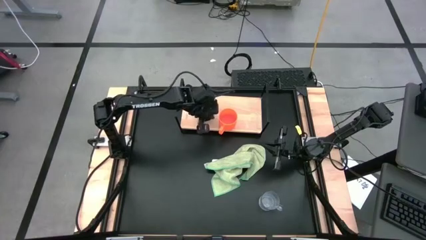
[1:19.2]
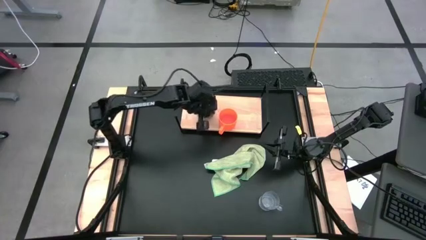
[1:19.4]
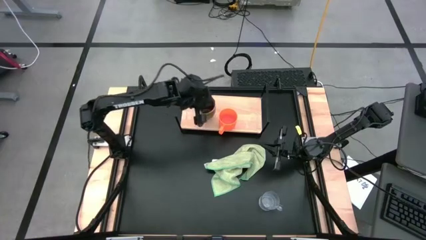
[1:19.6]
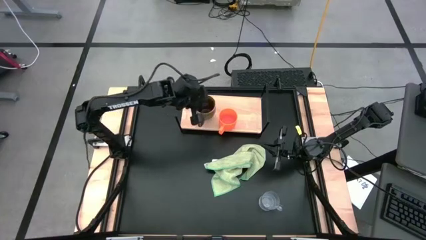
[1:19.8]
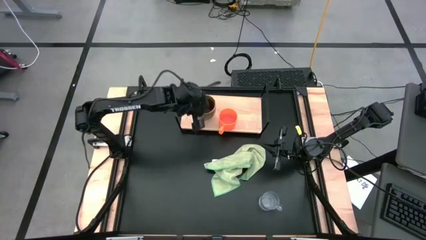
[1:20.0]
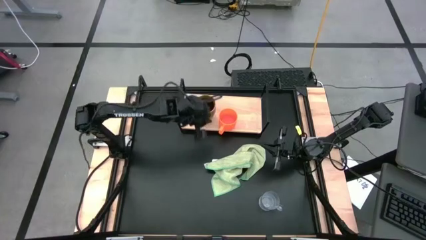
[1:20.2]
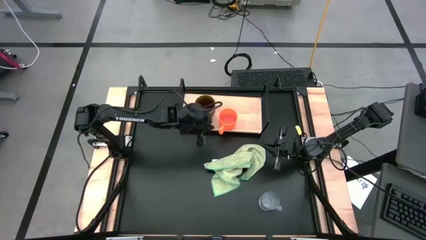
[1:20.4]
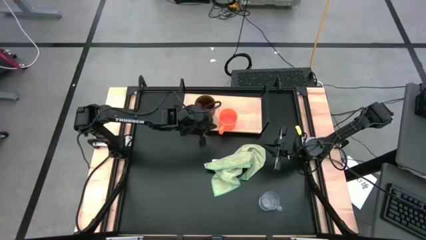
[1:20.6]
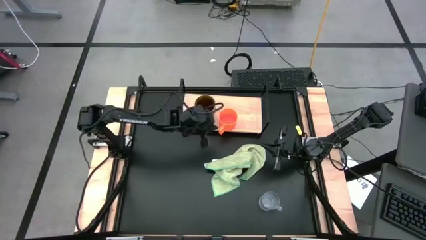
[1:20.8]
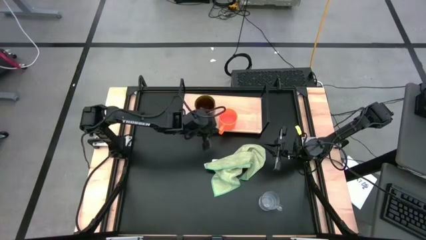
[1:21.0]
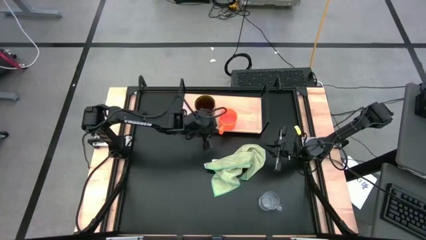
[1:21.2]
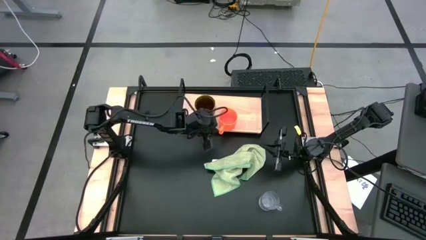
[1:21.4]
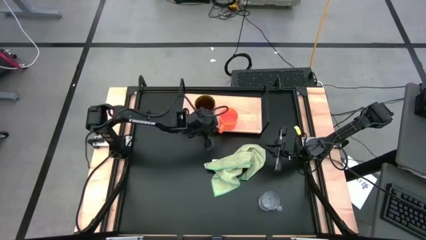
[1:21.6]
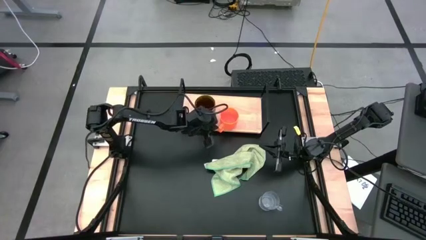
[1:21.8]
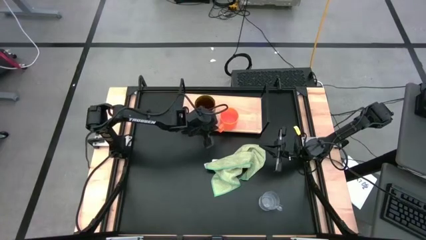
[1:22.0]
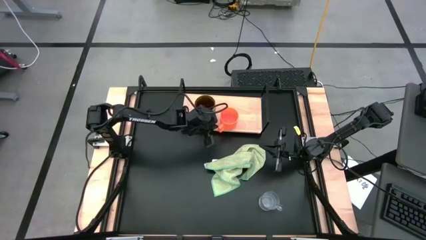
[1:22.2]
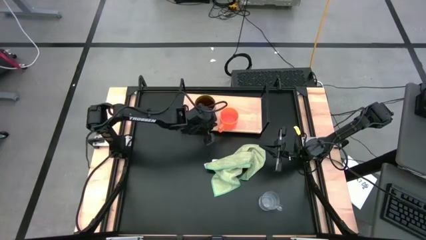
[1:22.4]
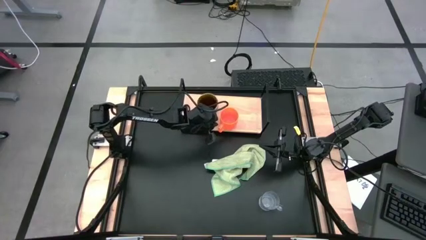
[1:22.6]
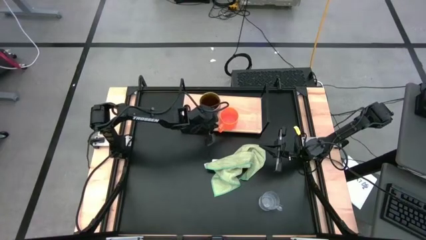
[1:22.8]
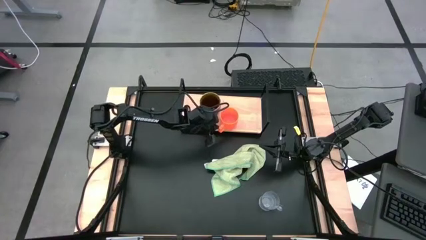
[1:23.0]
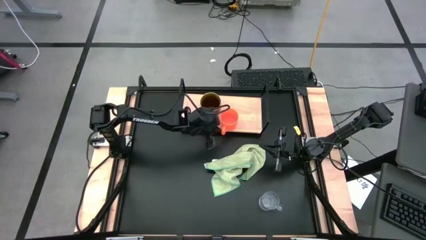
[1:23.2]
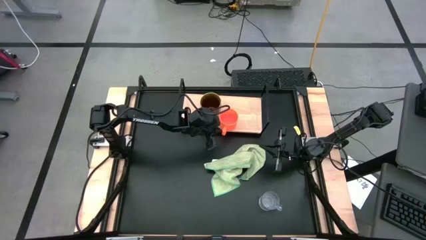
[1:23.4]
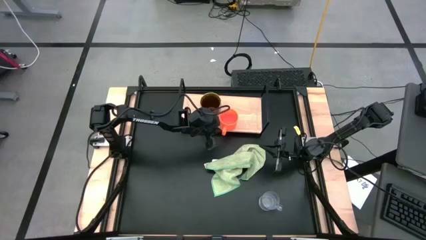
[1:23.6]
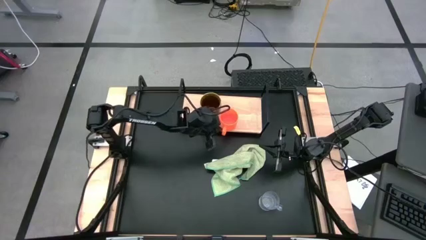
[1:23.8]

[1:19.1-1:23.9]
Task: Stack small to large cups/mugs on shelf
Adjust the orange mug

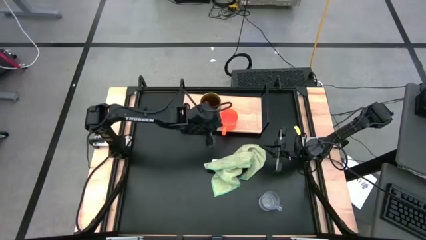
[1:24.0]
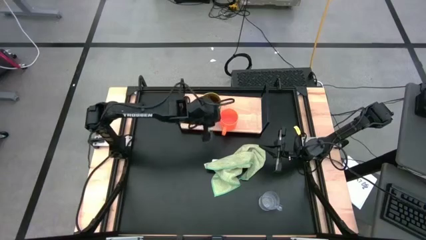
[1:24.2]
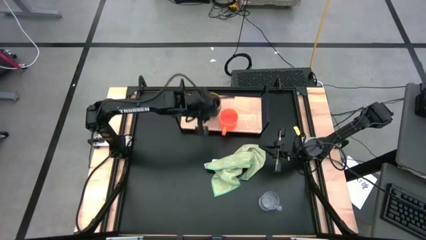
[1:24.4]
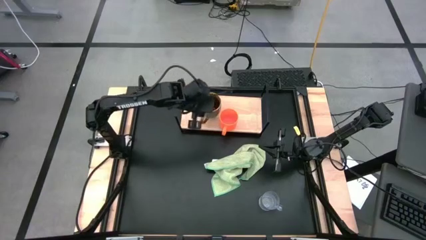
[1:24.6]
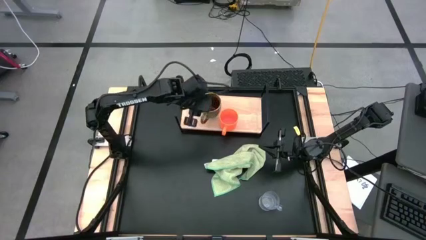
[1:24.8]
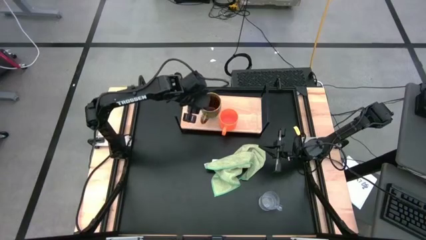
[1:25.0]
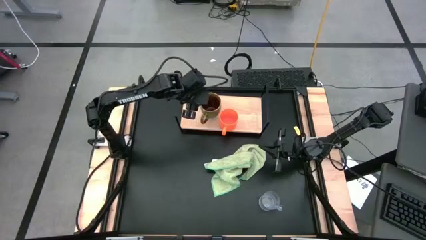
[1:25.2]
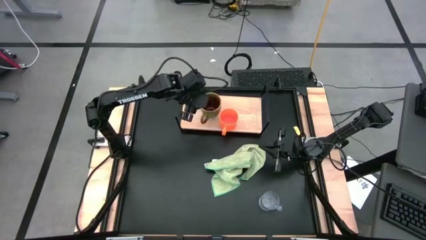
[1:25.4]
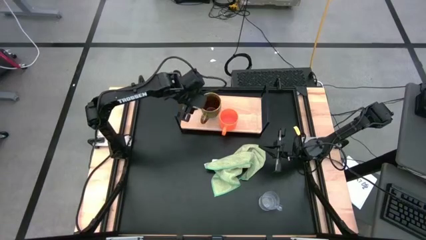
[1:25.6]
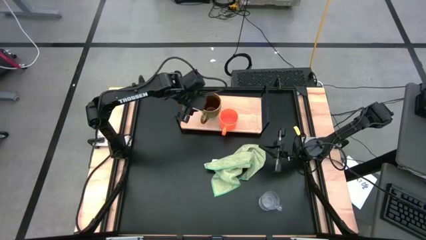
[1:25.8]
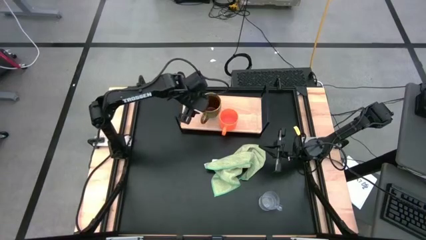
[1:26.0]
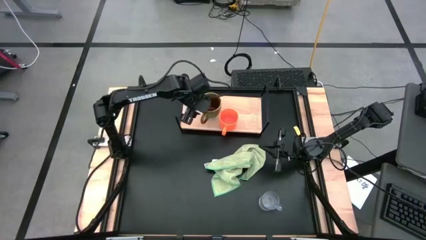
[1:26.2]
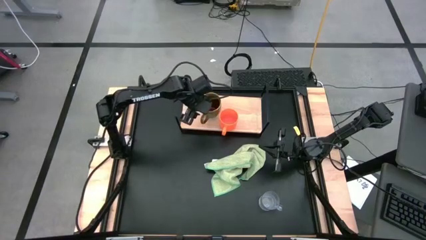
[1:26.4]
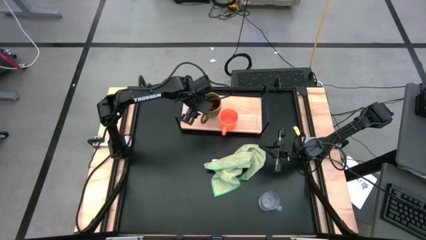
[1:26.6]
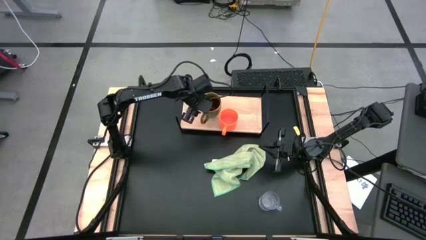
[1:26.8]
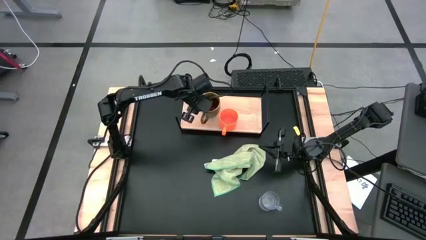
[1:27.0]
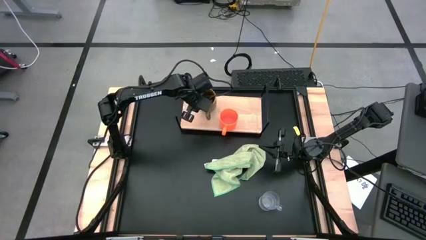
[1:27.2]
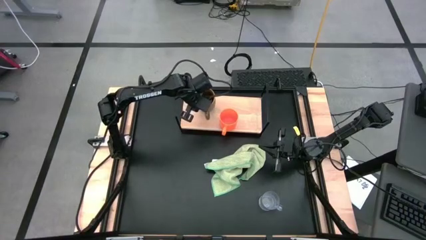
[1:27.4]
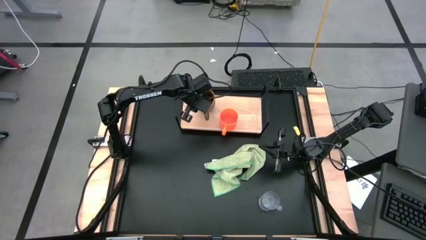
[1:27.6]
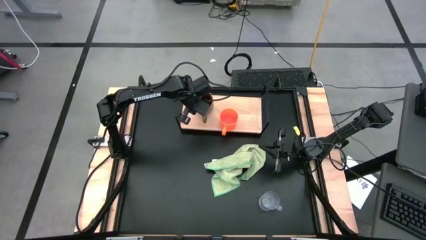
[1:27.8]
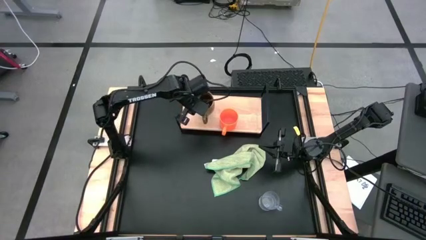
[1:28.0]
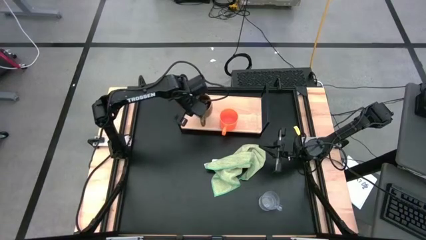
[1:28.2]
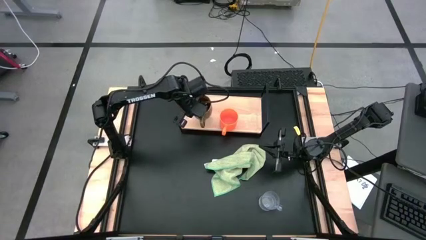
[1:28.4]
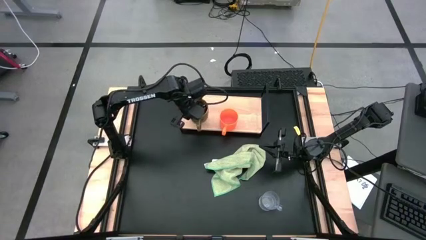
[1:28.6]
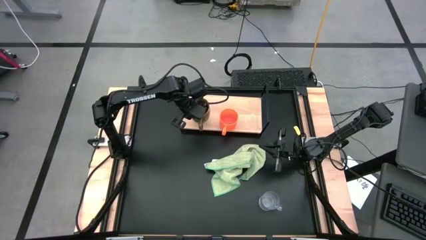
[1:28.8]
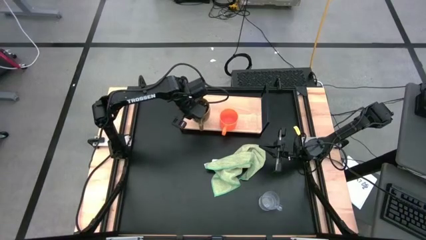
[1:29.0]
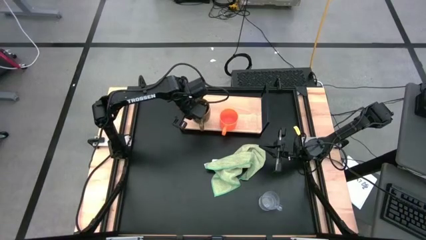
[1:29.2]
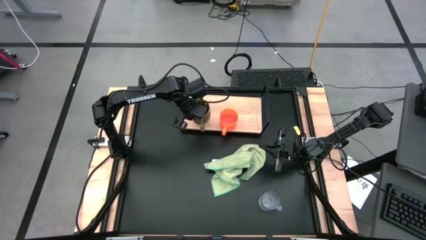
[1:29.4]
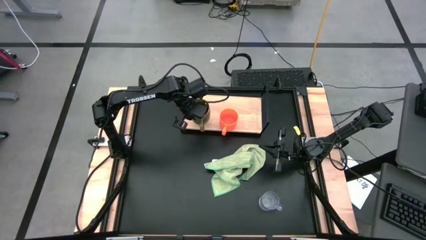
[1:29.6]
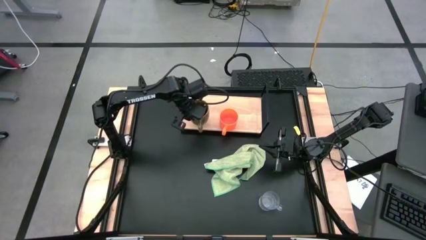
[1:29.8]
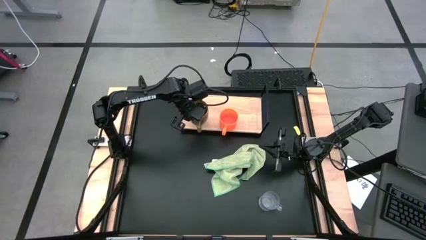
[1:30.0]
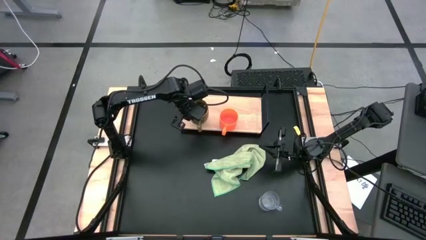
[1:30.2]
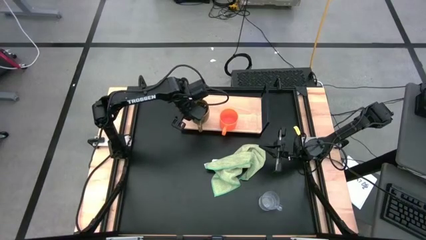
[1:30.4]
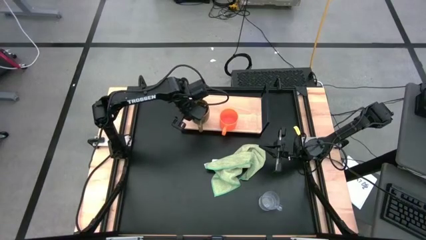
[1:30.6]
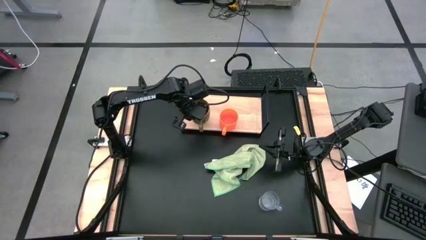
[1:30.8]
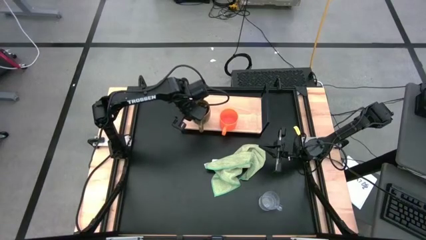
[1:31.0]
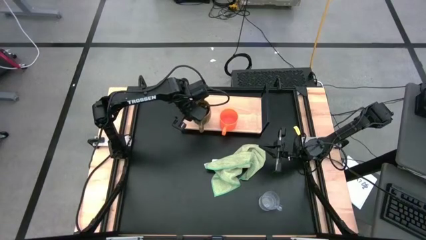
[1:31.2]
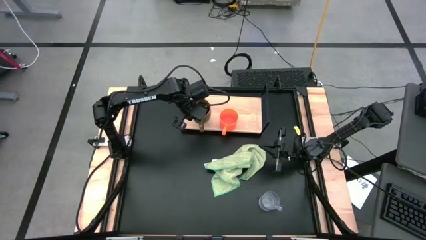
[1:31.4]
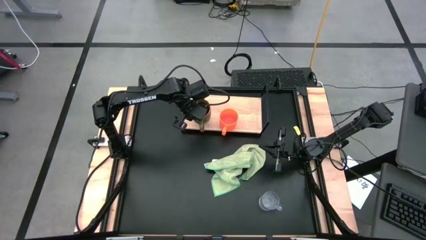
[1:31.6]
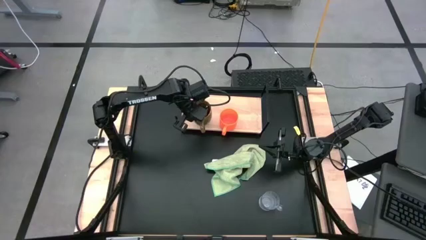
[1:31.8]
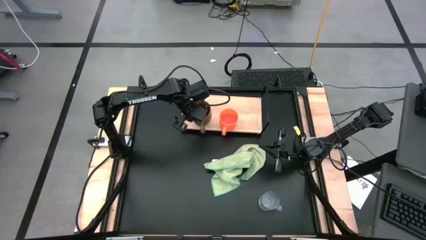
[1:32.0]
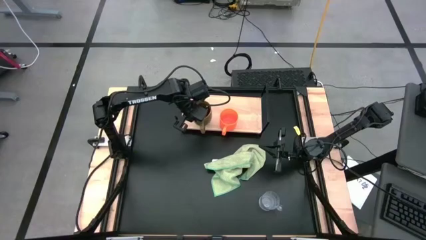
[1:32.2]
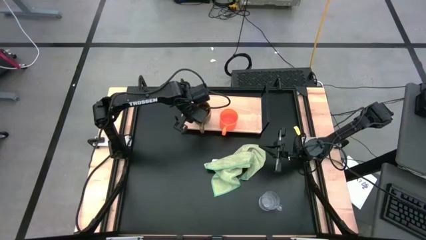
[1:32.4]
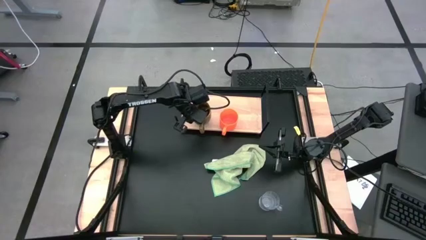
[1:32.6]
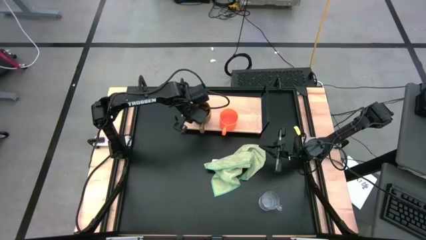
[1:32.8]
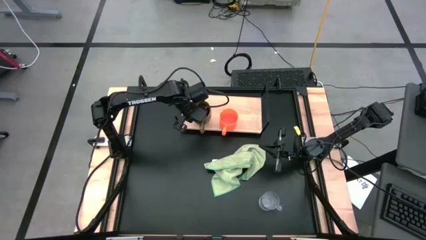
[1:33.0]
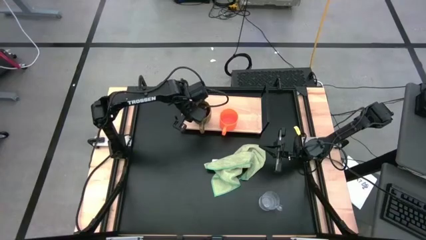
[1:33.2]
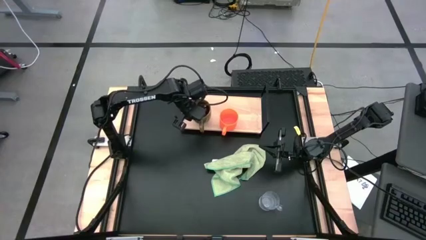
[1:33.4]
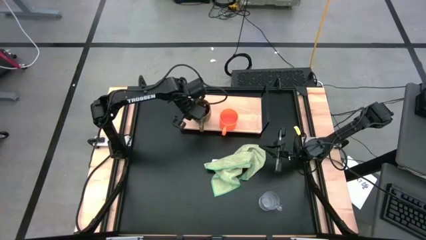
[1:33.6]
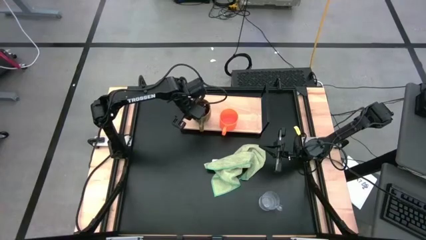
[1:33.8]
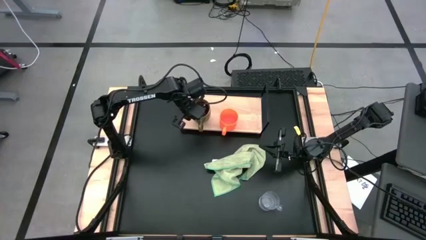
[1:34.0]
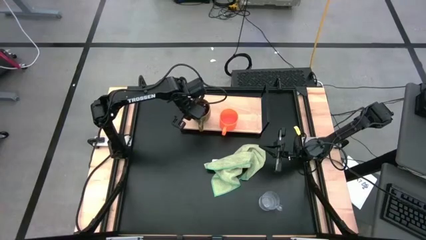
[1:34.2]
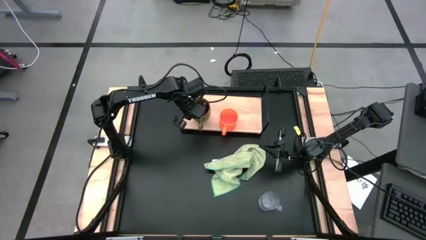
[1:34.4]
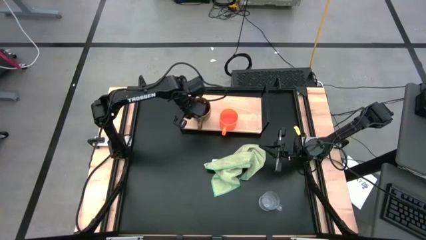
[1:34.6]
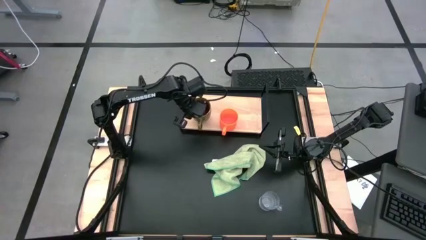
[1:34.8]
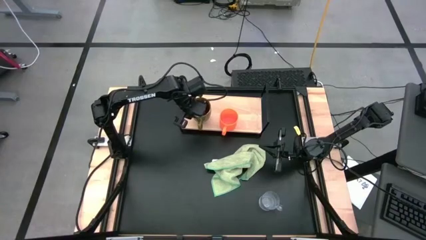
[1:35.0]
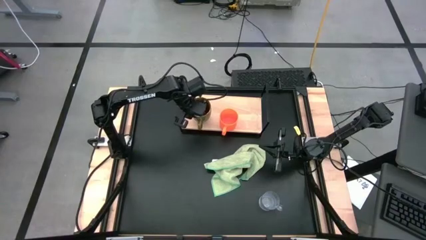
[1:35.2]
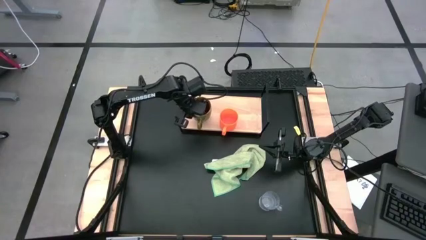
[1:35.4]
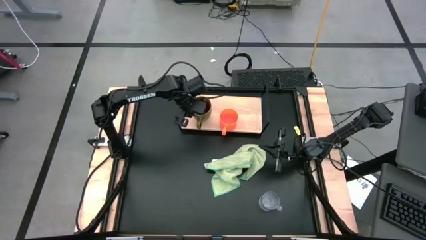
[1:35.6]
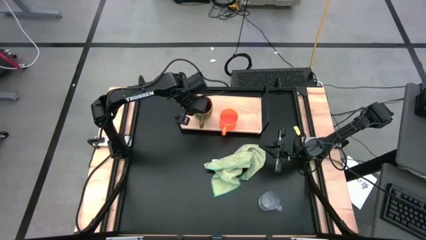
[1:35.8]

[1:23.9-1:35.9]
Adjust the green mug
